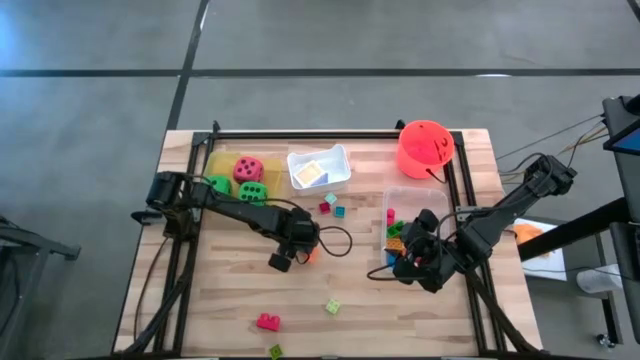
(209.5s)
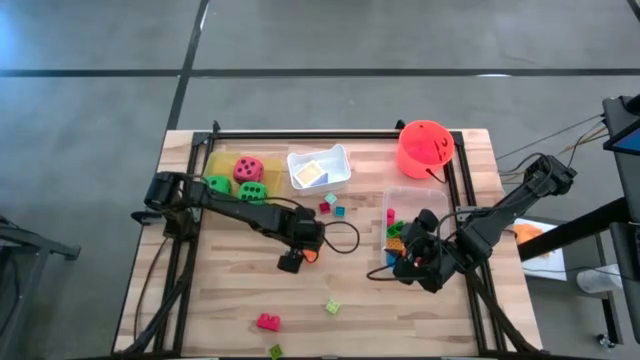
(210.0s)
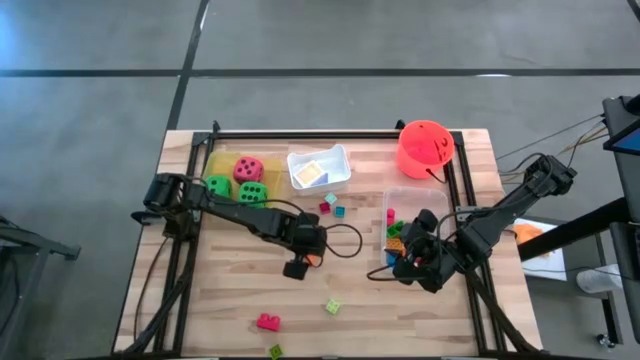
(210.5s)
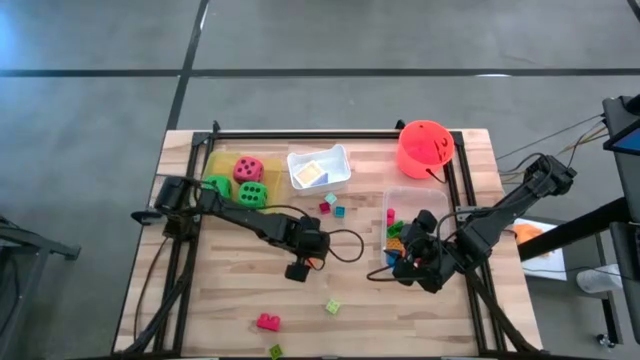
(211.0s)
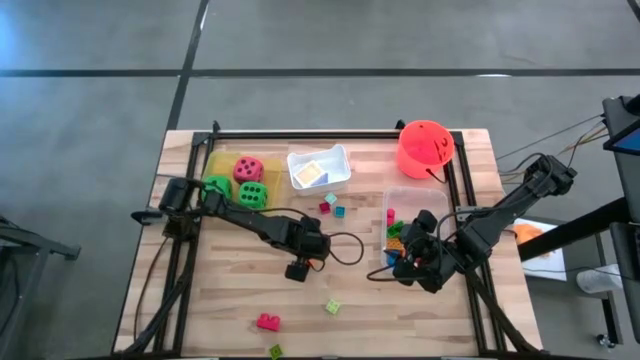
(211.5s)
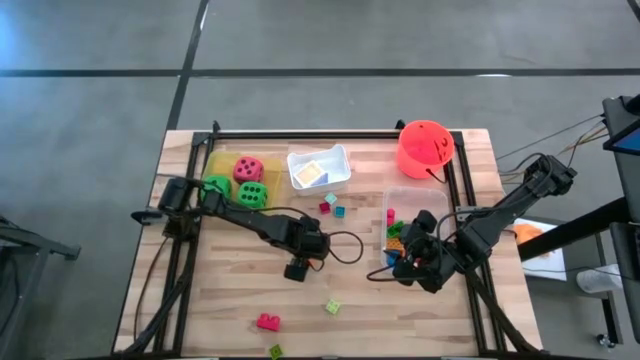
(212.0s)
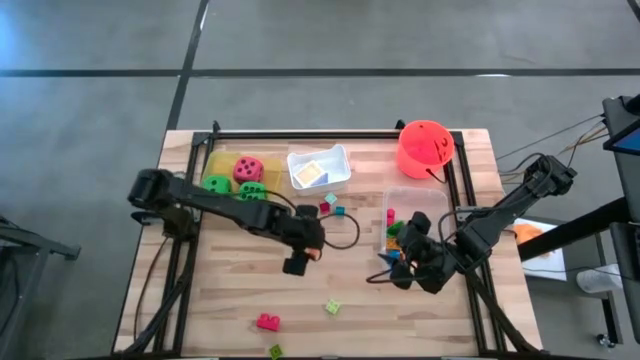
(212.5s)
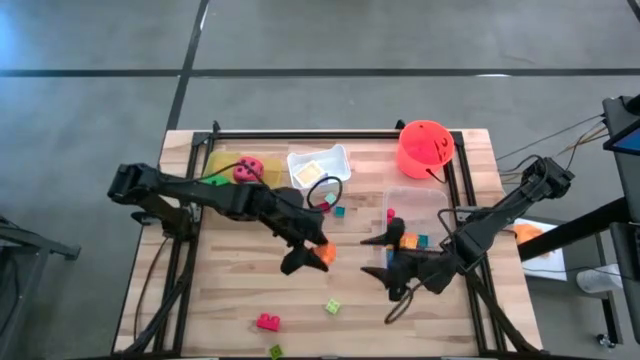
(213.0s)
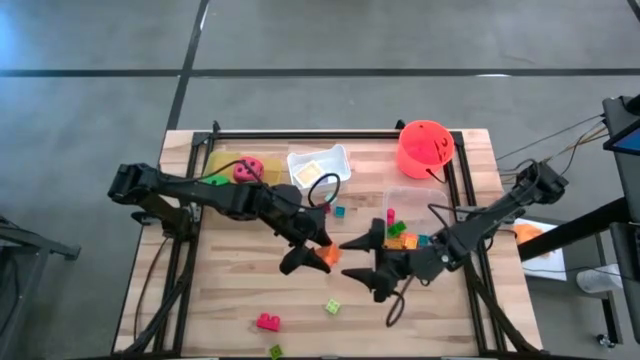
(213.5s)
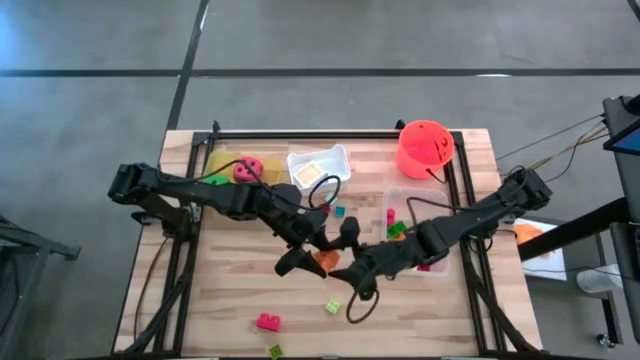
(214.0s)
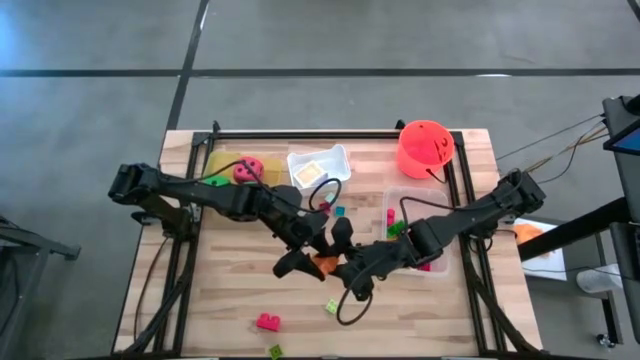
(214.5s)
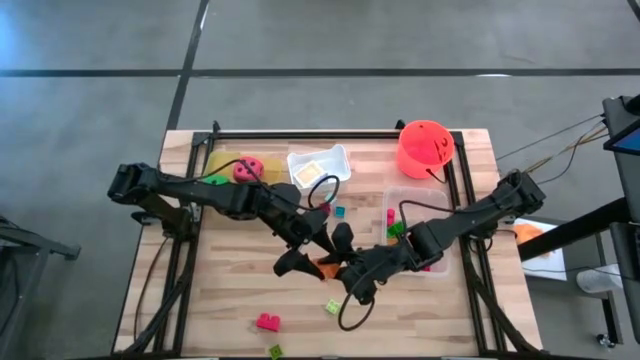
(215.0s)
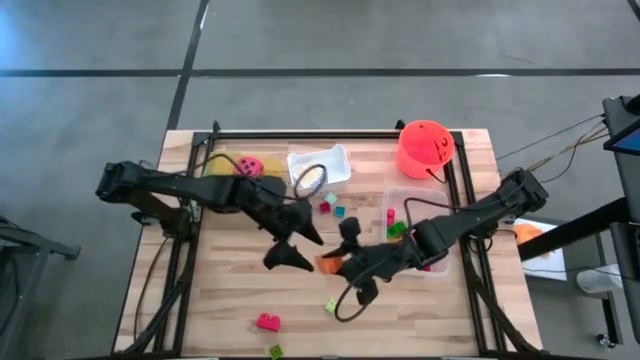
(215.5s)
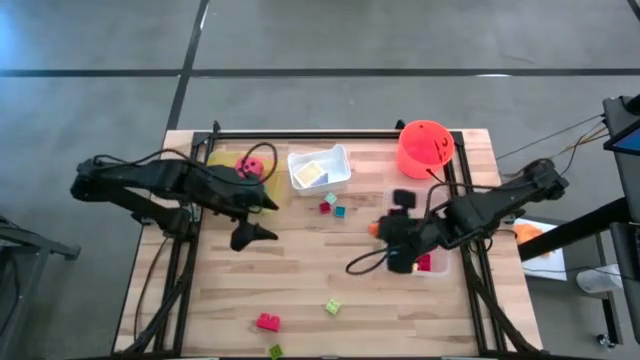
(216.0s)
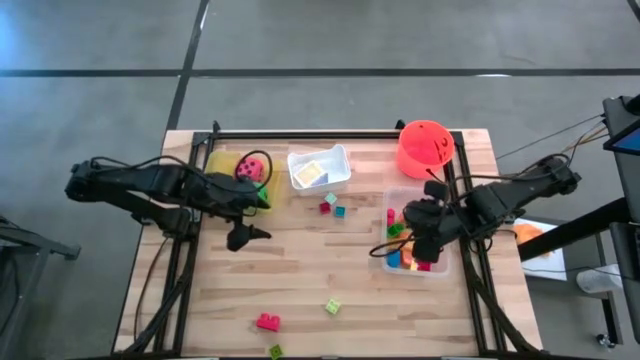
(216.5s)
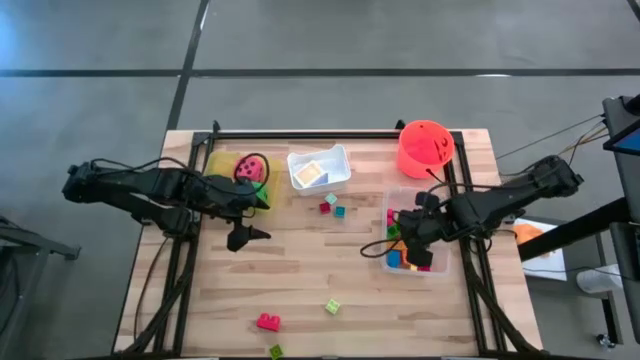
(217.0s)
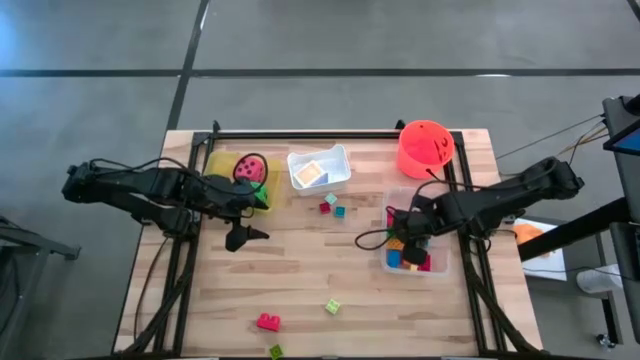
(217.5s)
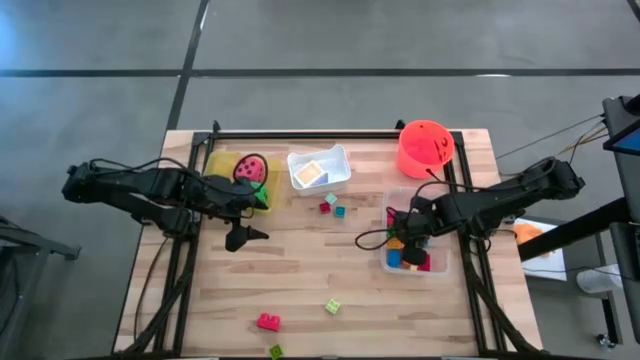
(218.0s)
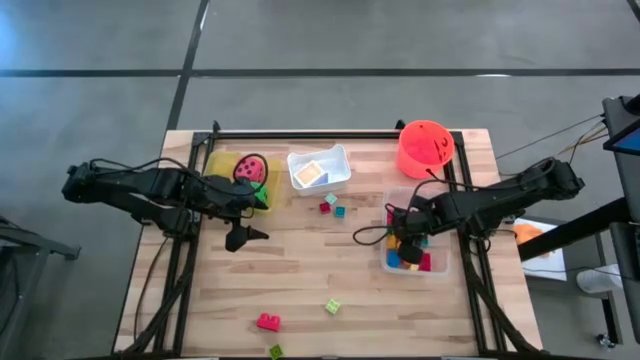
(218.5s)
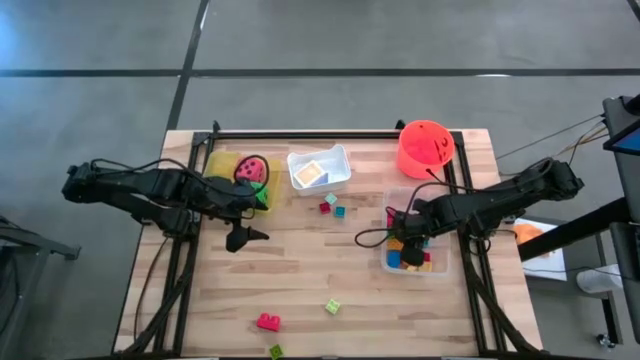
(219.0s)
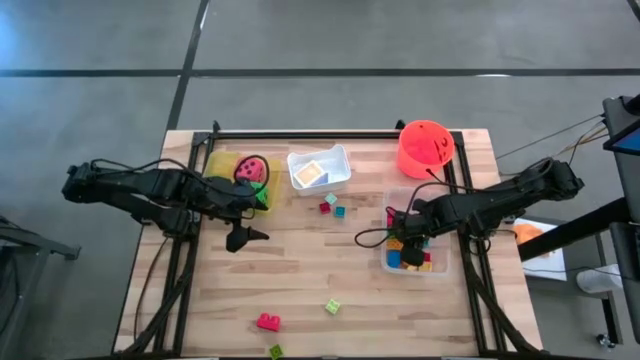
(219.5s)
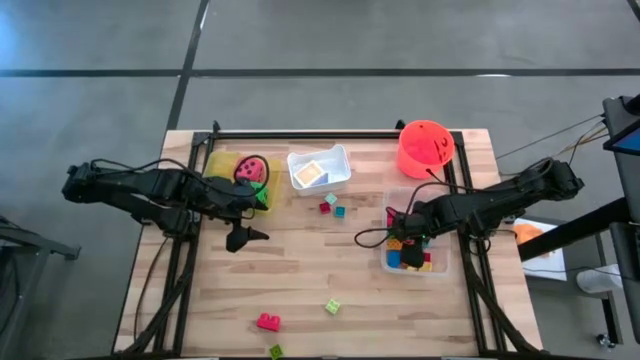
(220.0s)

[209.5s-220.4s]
Task: Pick & Place Toys
Put the orange game piece into the transparent bin

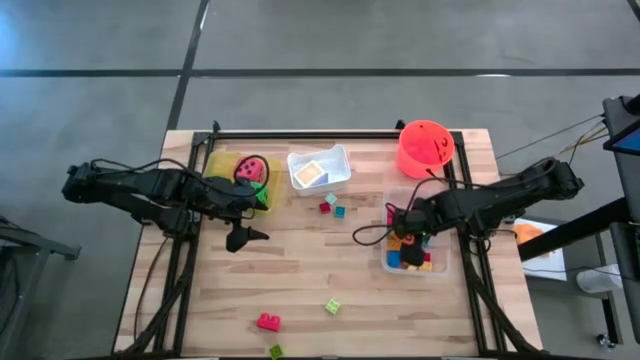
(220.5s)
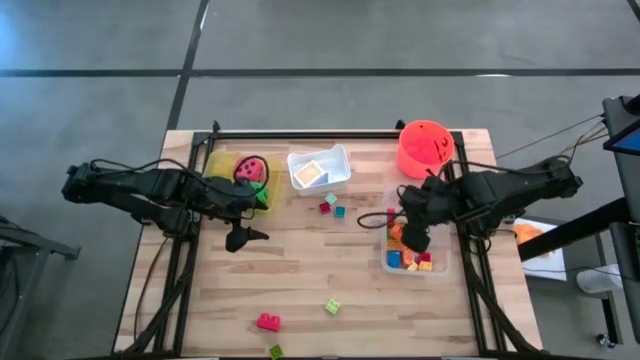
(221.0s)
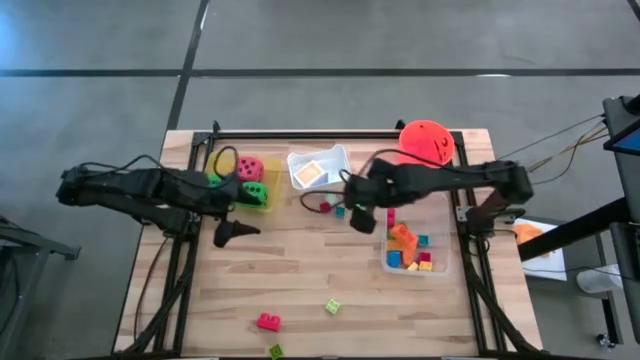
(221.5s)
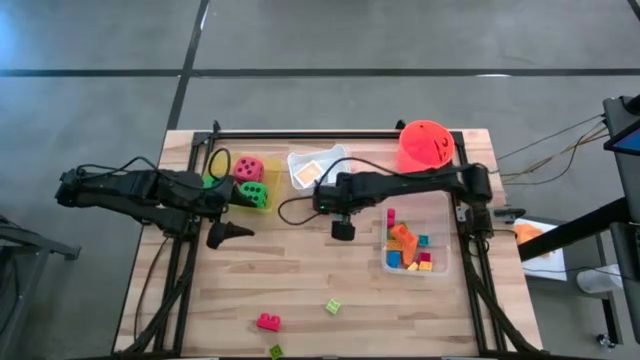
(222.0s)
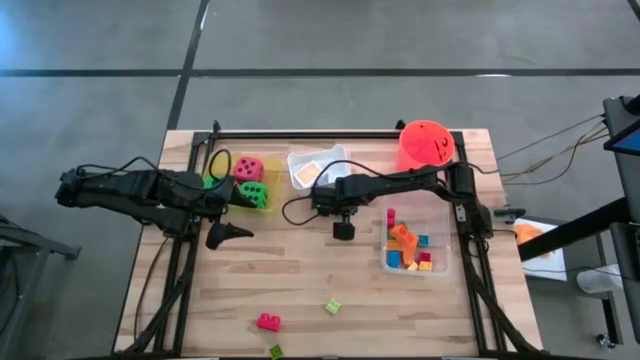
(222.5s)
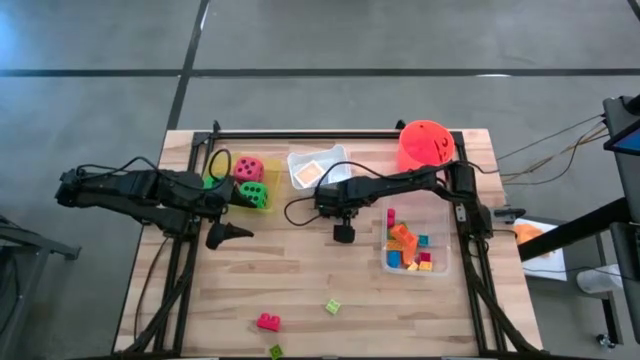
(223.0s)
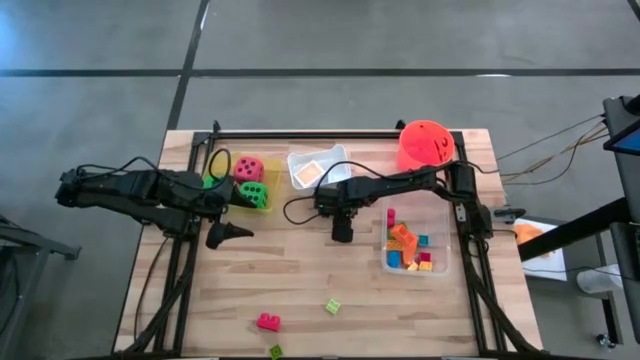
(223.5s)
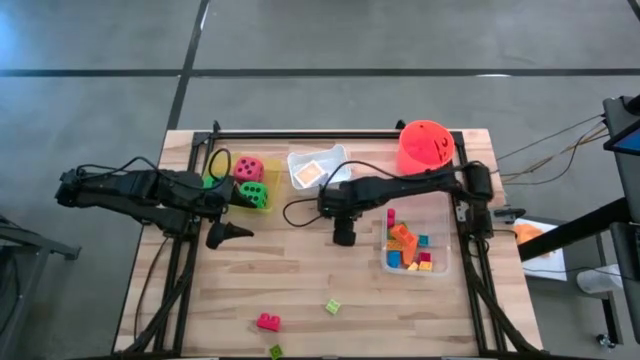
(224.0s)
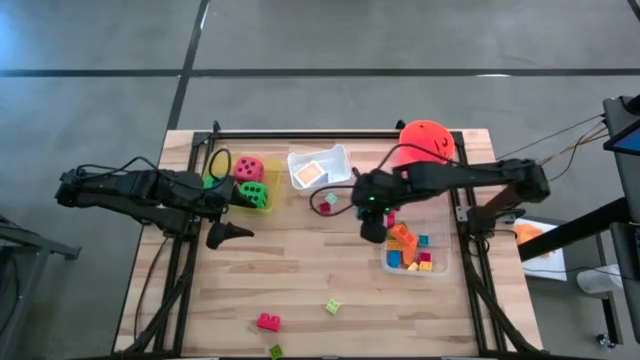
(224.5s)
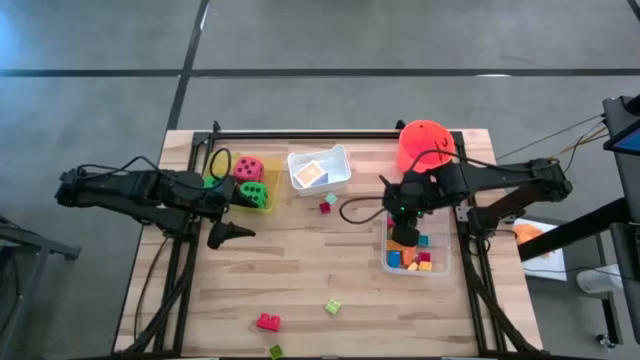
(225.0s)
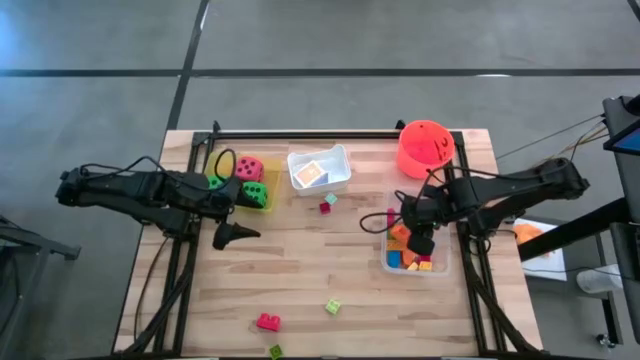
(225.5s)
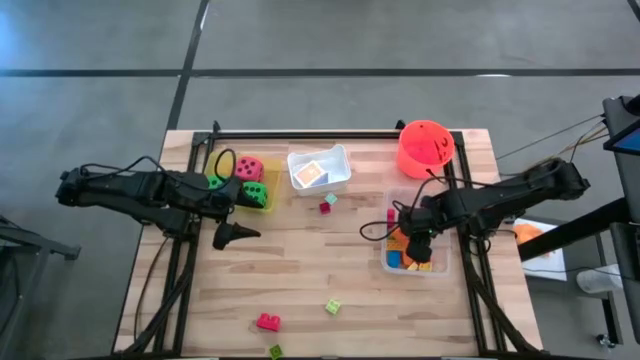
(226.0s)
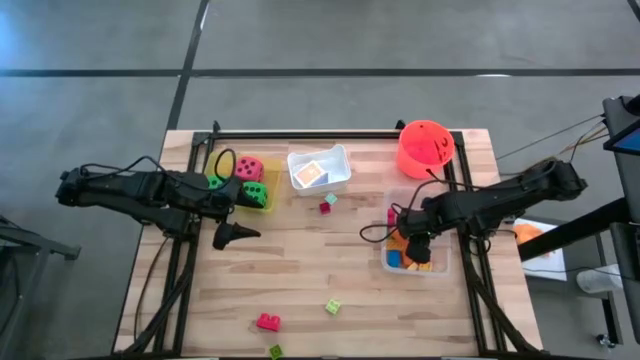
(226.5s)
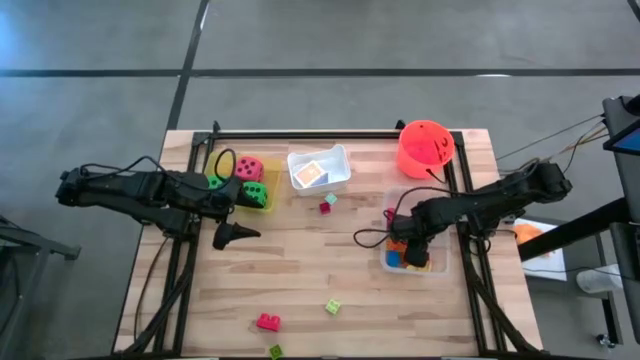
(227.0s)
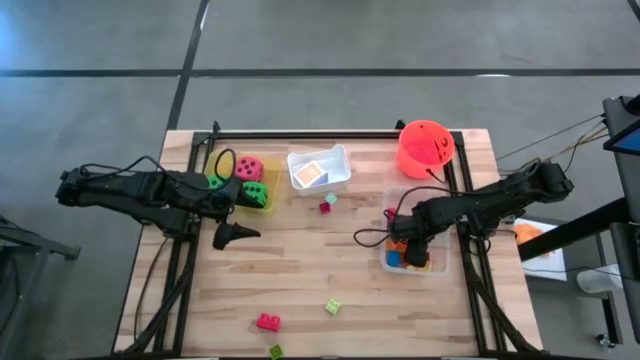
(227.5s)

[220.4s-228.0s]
Put the blue game piece into the transparent bin

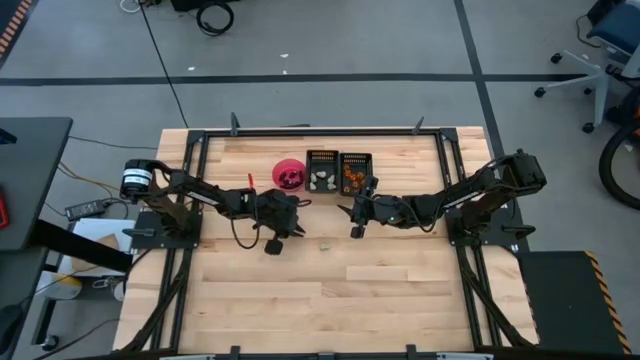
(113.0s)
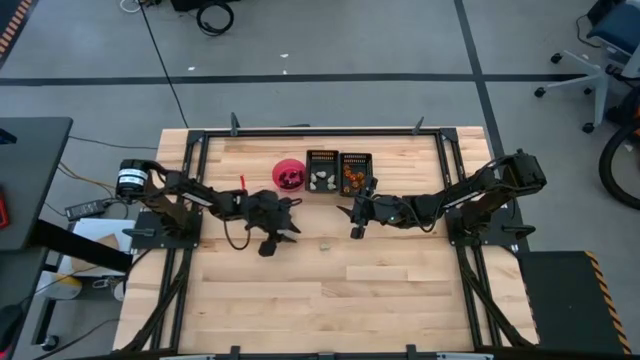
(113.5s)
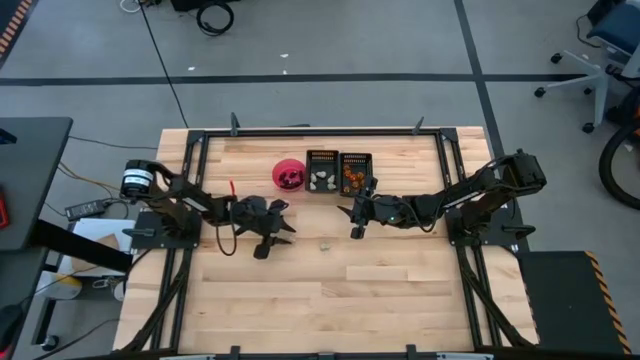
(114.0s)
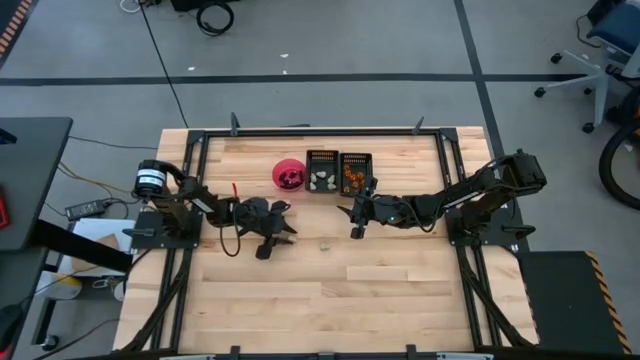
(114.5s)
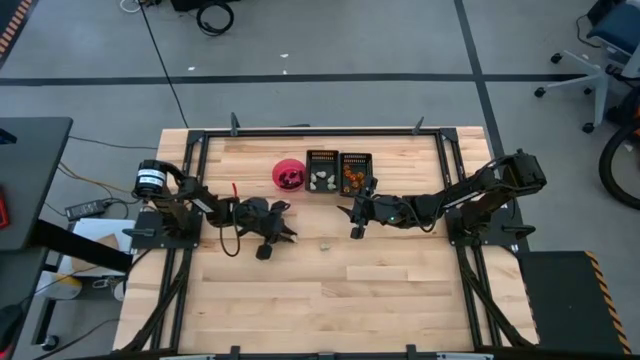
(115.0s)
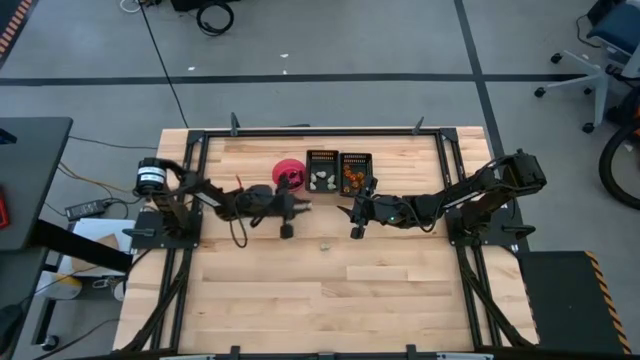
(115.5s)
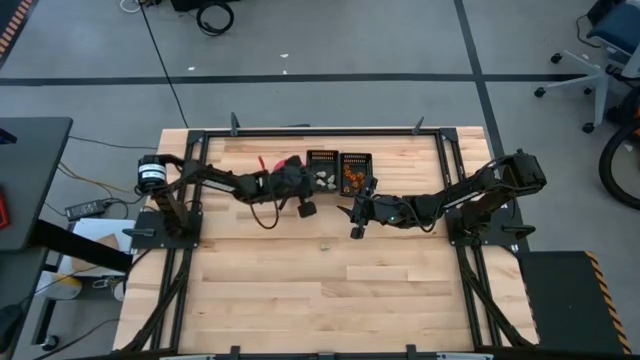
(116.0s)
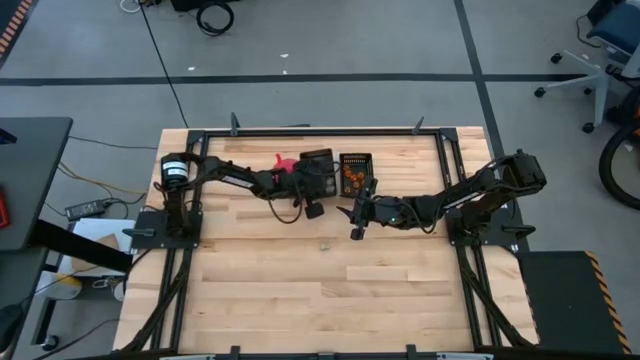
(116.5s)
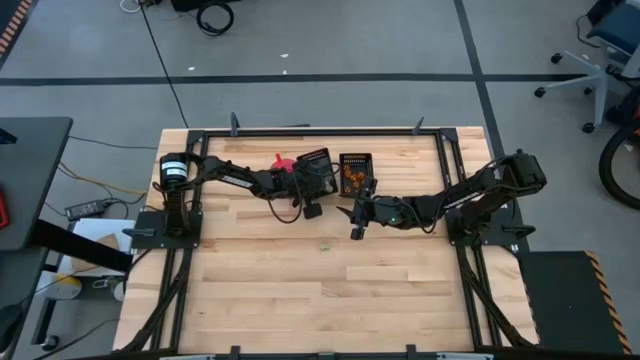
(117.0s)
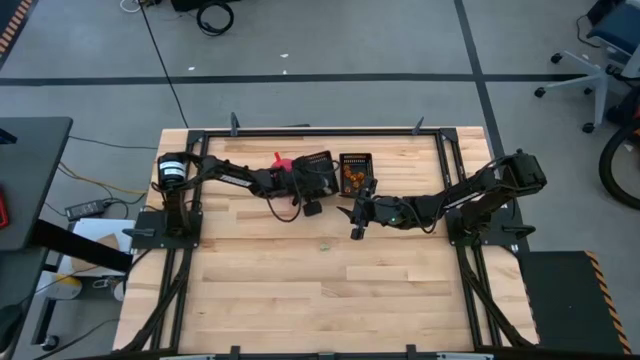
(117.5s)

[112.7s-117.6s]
Task: Sort Halloween decoration
Put the white skull toy into the left black bin
